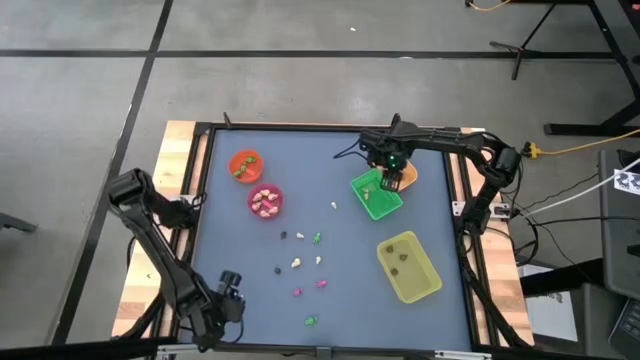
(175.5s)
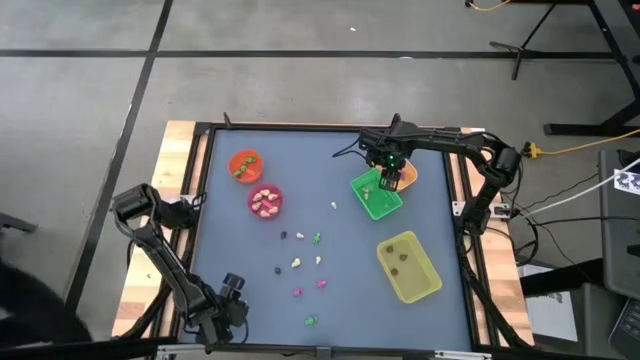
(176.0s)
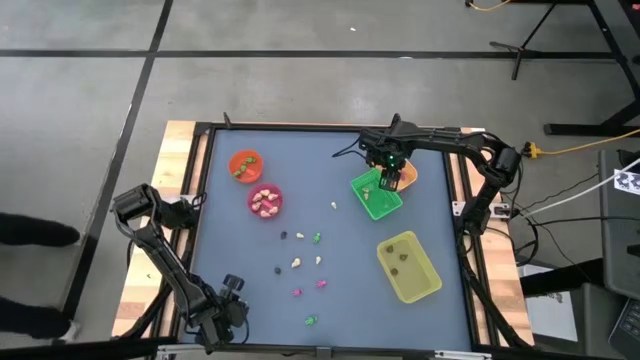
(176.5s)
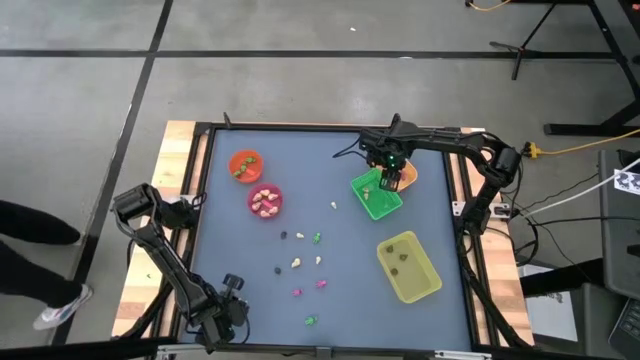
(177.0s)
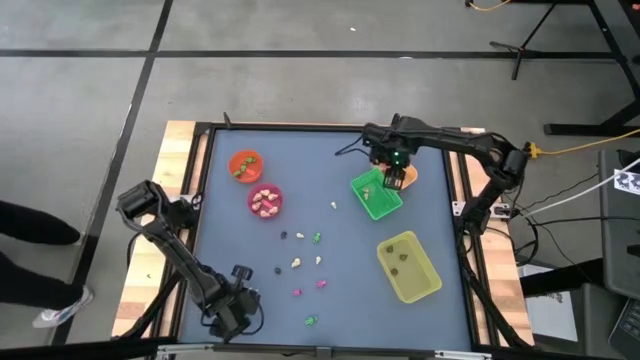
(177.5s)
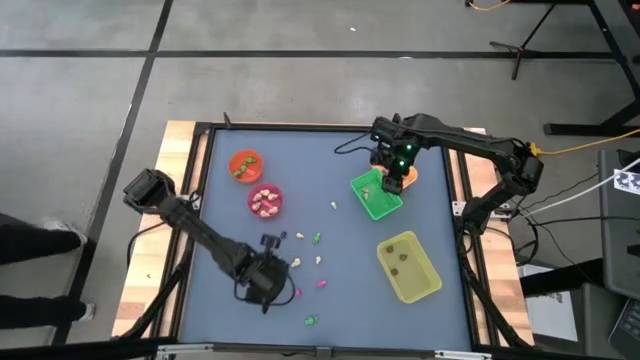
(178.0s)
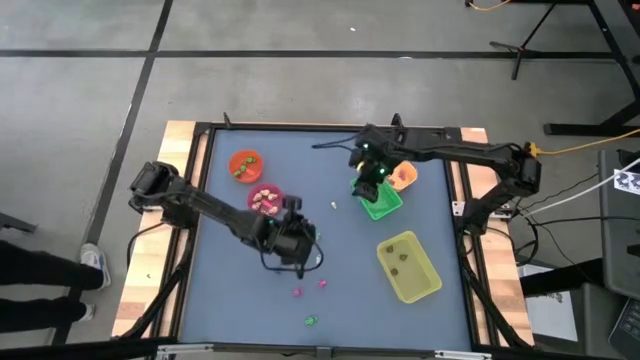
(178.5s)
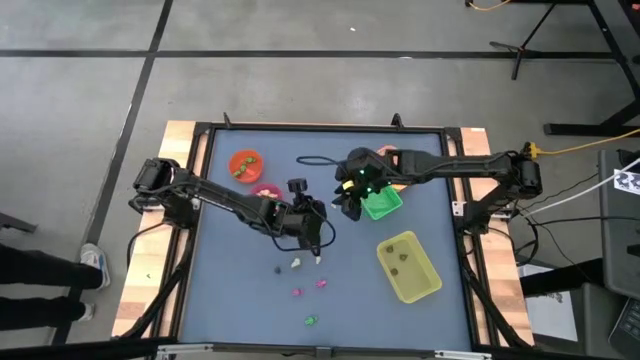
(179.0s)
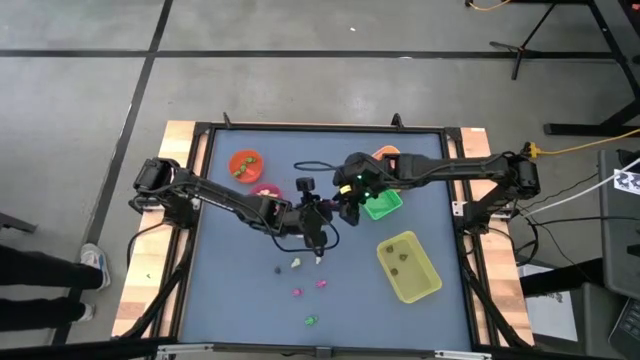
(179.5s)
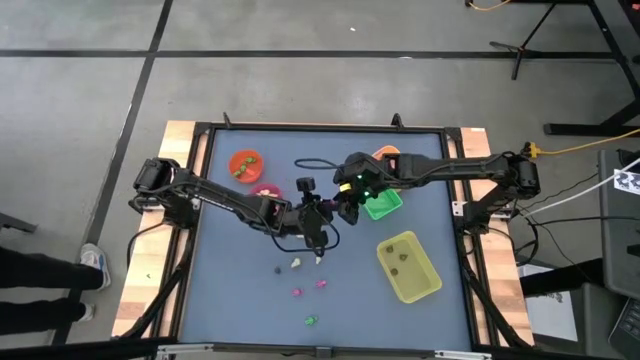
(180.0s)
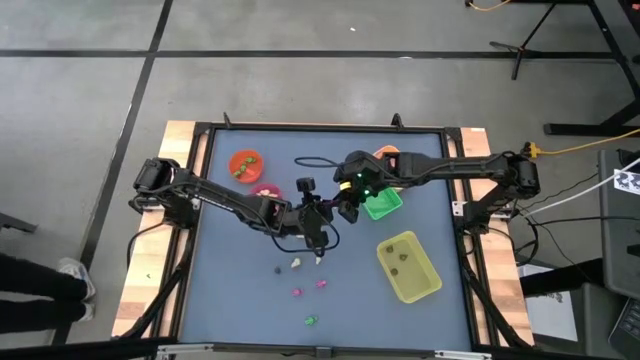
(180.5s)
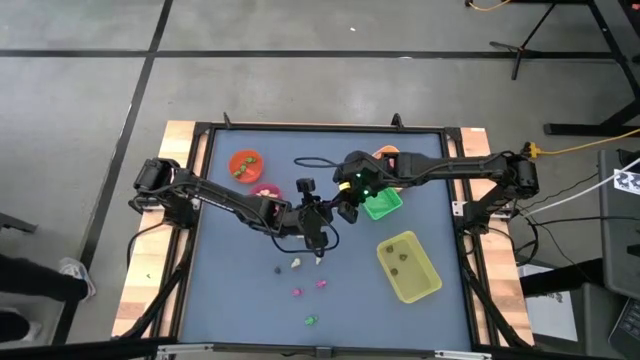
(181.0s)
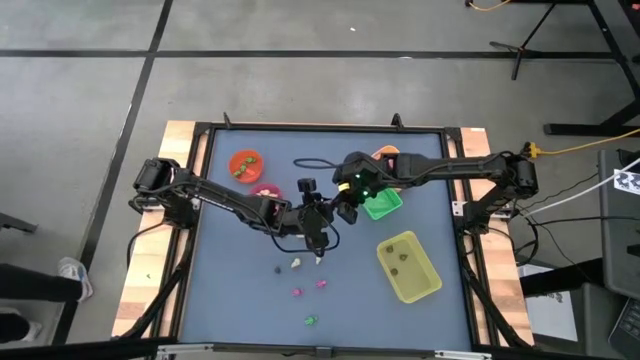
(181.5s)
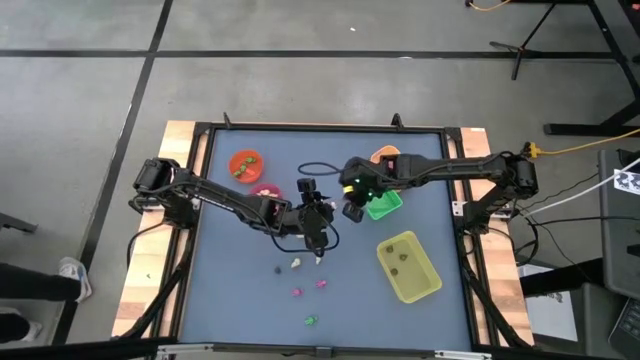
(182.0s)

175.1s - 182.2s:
Task: Sort Halloween decoration
Put the pink skeleton toy into the yellow bin

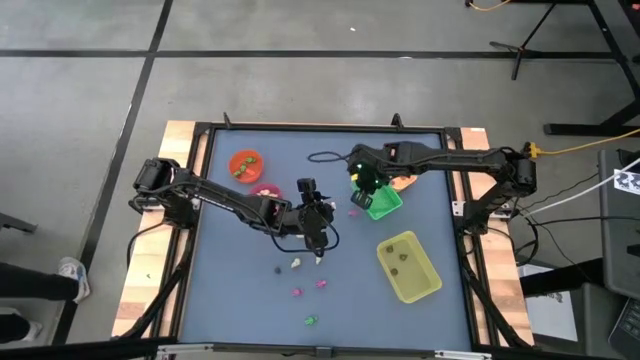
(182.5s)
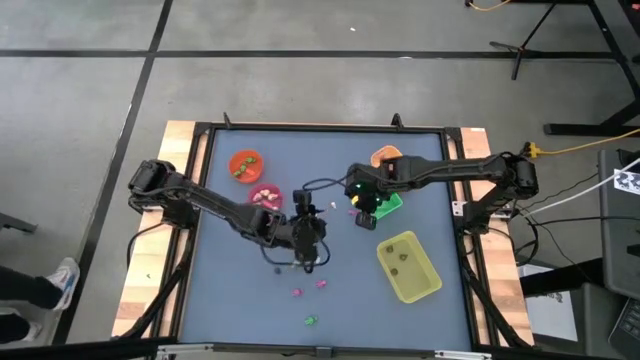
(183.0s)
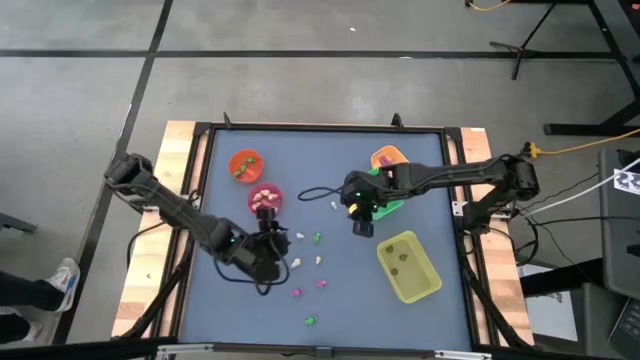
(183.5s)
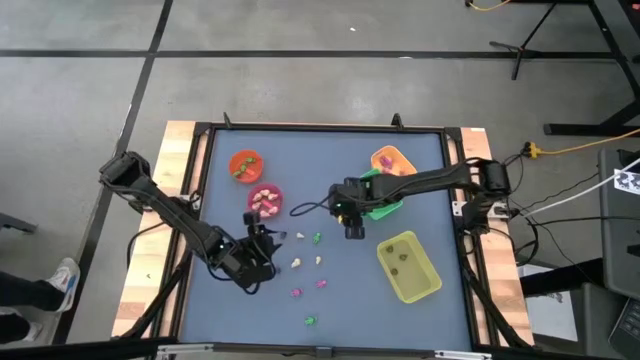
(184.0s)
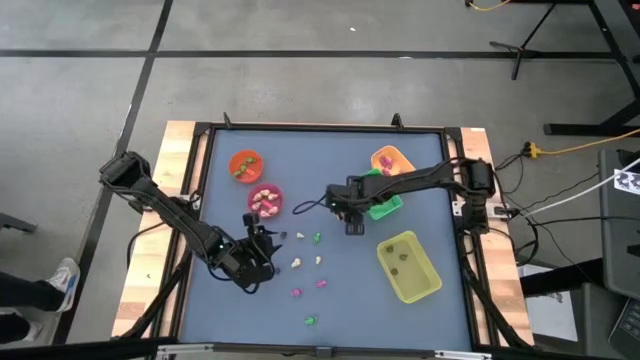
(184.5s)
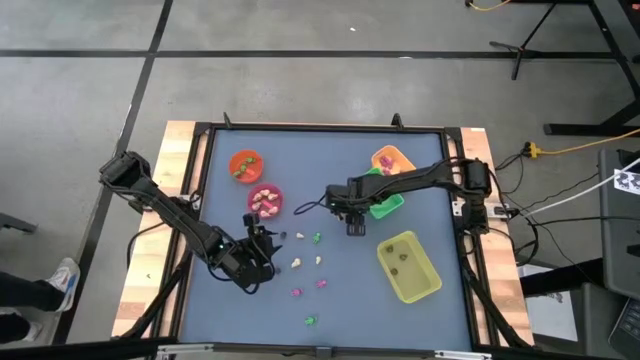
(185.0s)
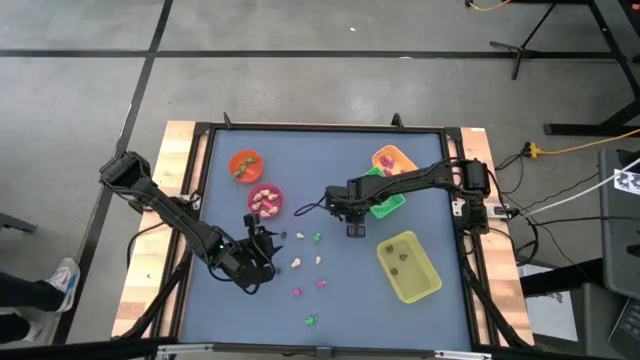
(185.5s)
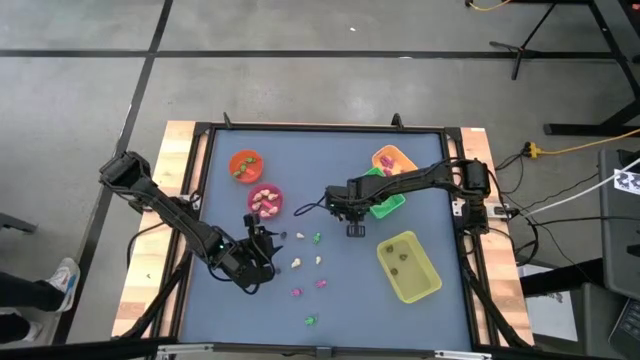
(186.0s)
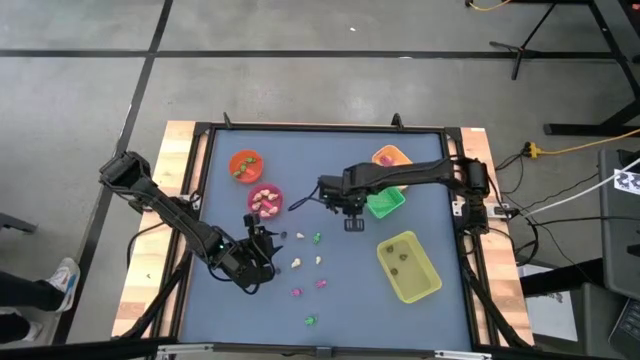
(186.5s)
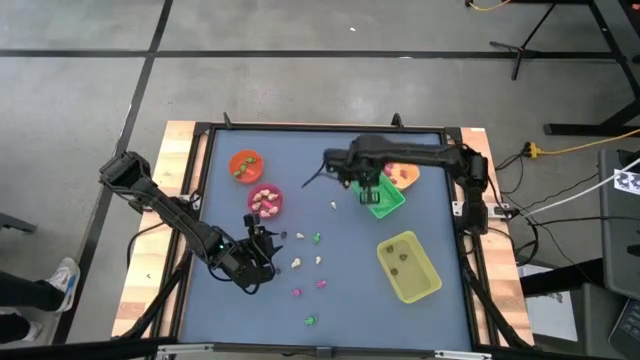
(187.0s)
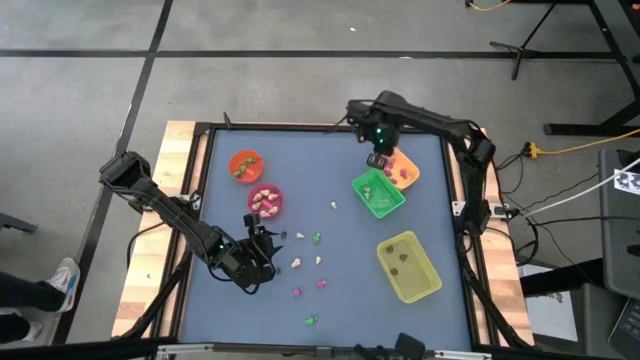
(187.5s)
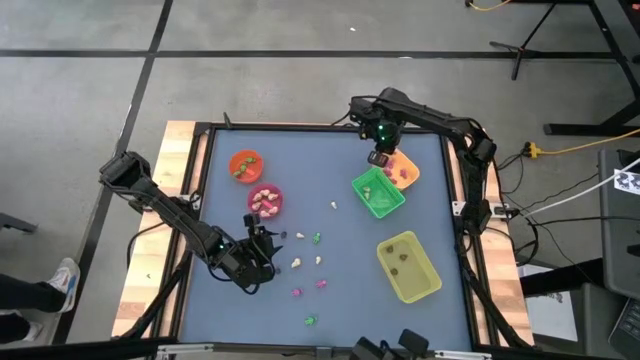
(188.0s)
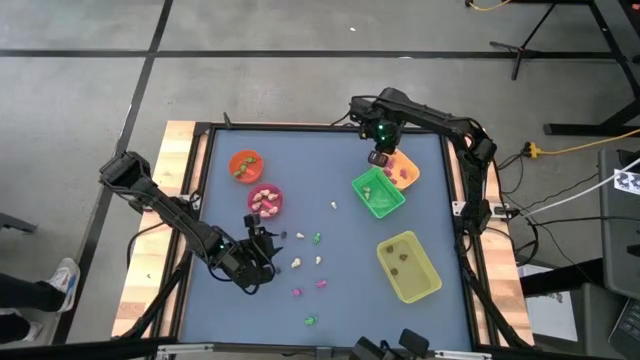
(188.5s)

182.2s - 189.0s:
Put the pink skeleton toy into the yellow bin

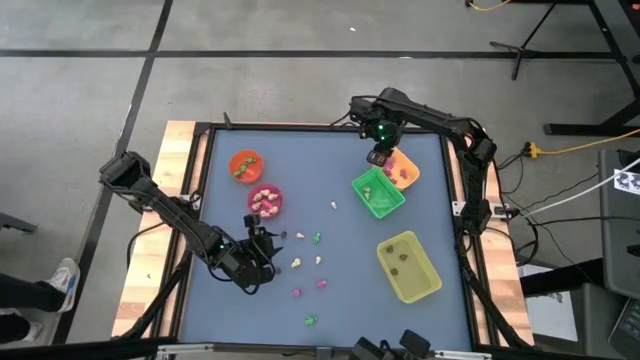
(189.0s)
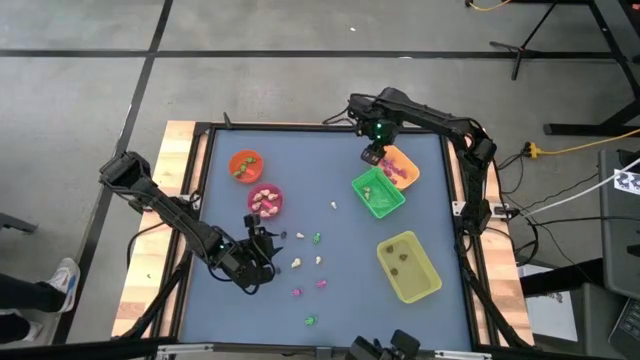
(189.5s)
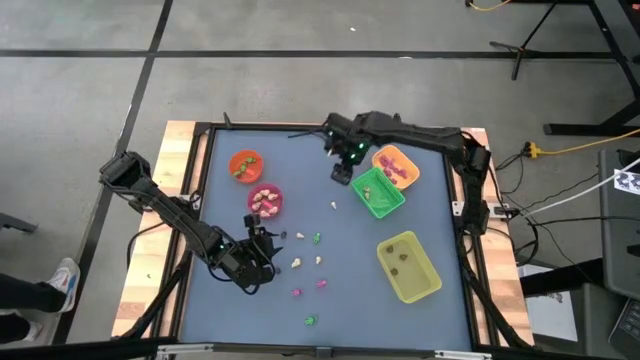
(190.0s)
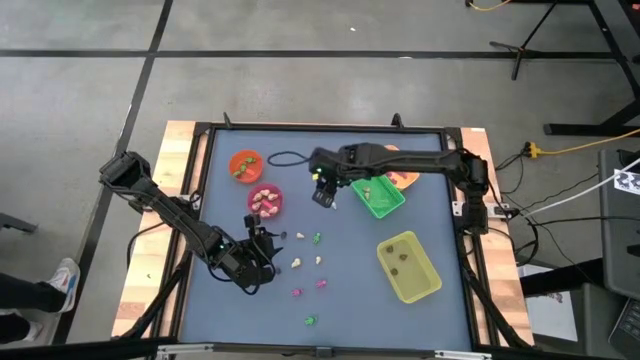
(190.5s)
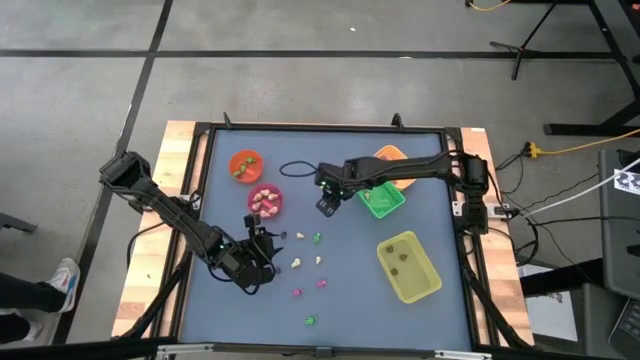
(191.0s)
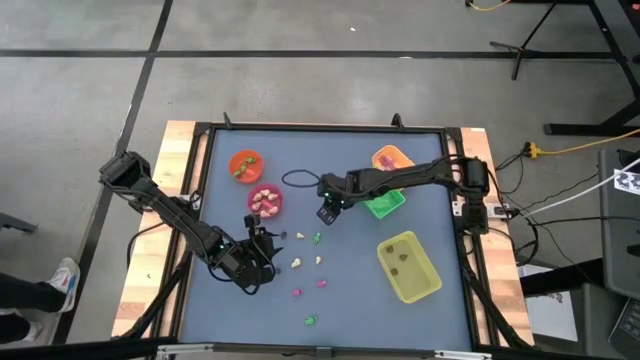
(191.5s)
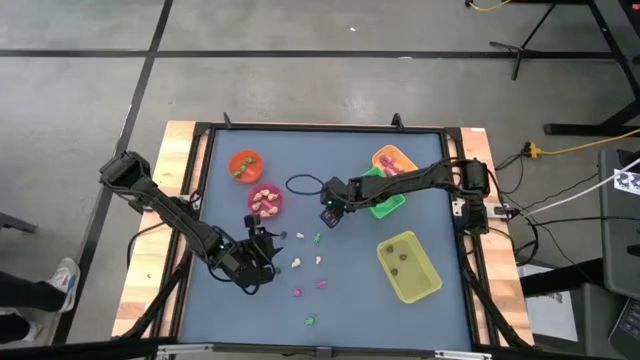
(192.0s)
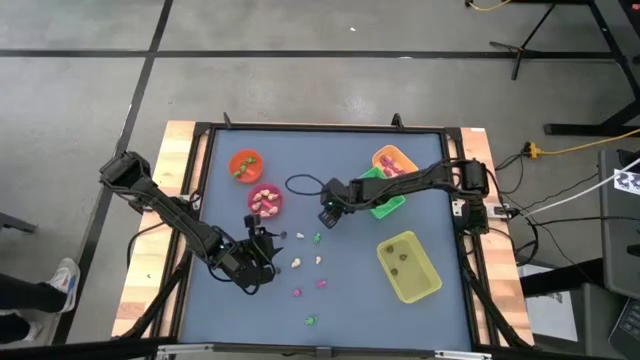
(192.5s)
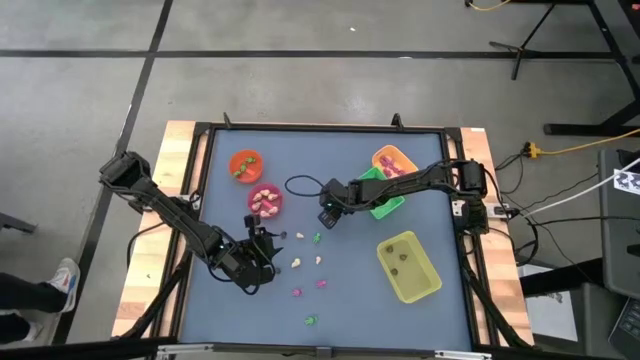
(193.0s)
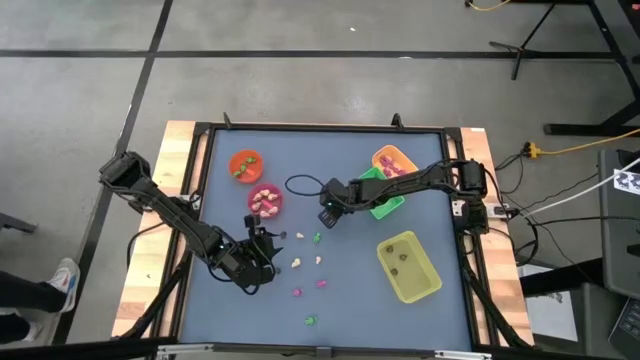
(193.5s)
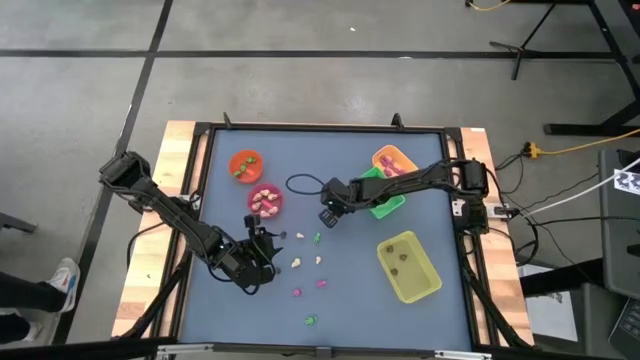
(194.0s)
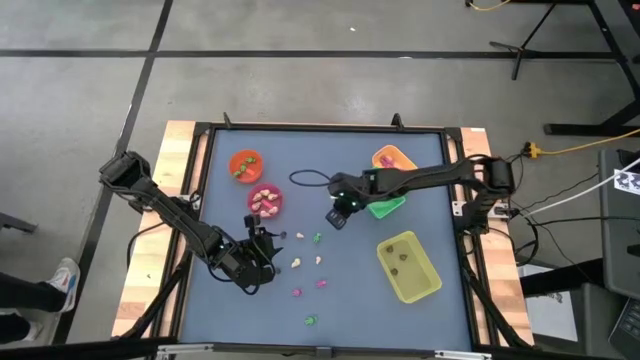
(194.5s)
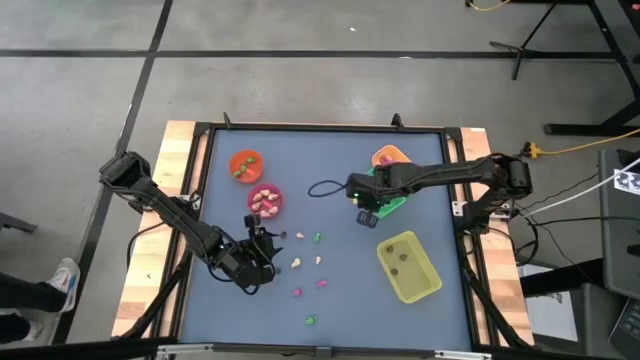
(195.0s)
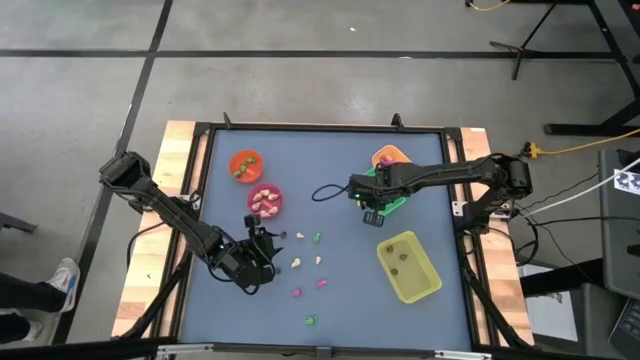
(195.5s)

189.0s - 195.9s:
Put the white skull toy into the green bin

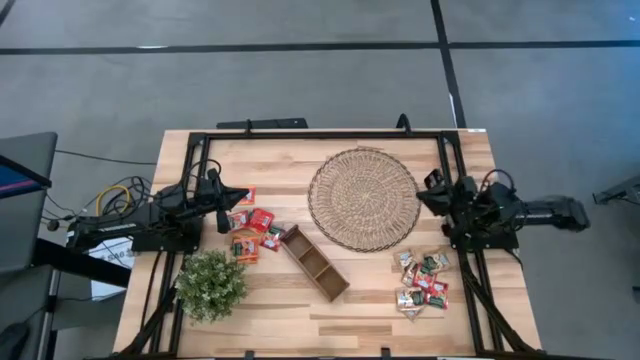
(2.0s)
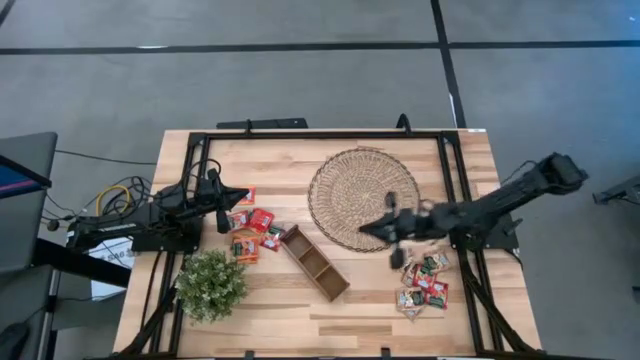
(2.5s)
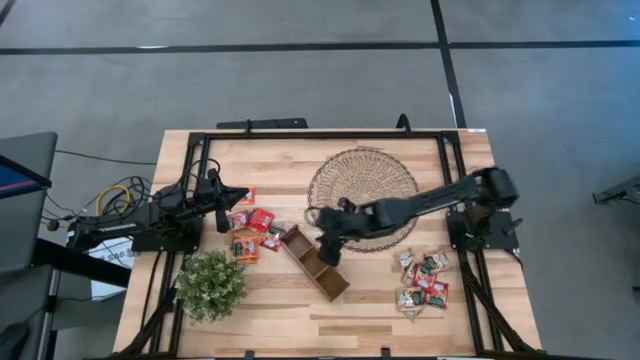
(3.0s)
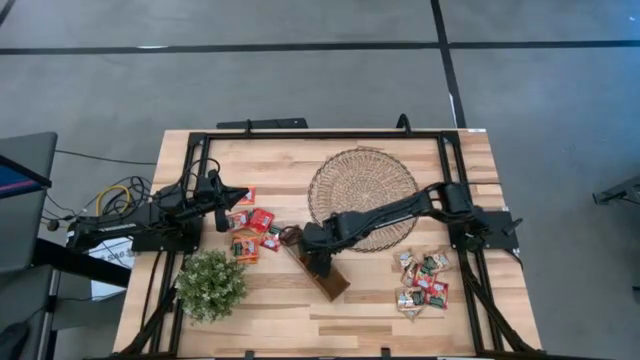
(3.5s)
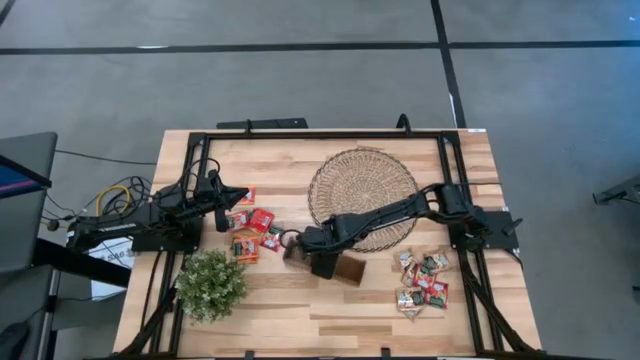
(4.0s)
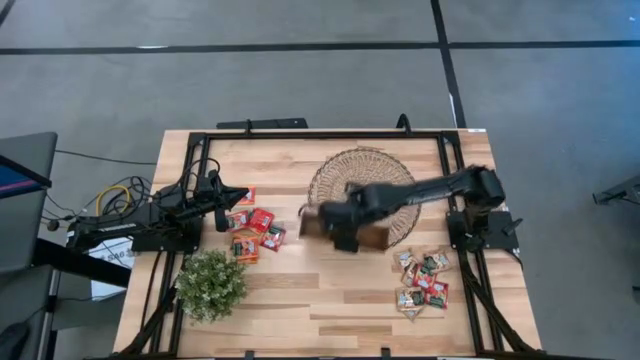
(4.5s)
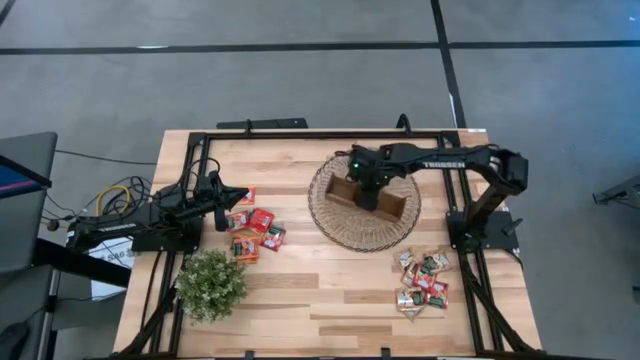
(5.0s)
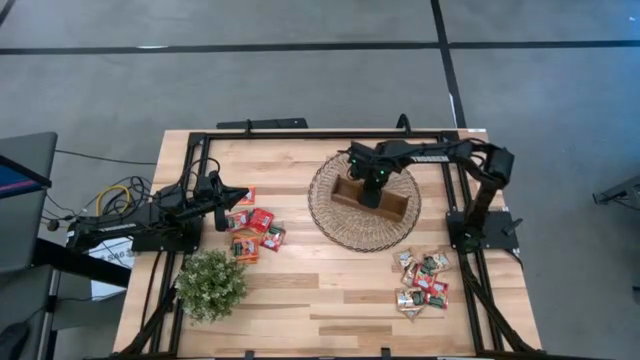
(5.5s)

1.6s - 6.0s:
Task: Pick & Place Tea
Move the wooden organizer on the brown mat
